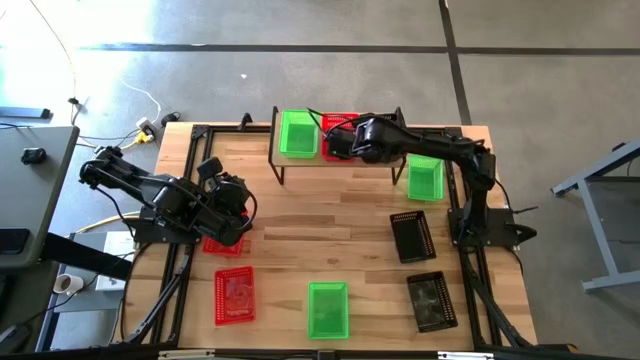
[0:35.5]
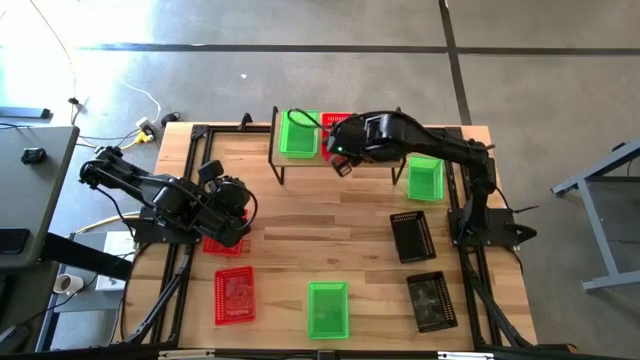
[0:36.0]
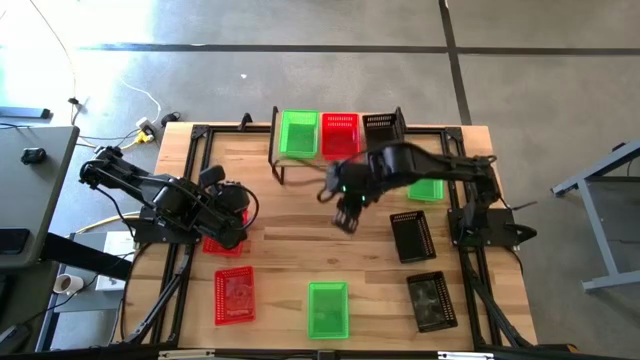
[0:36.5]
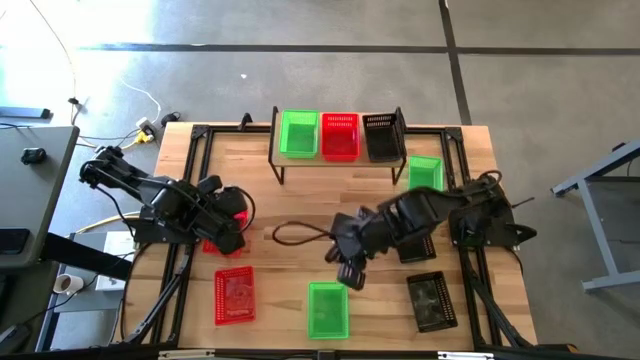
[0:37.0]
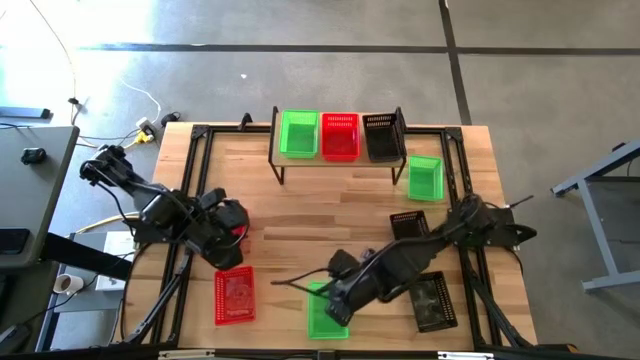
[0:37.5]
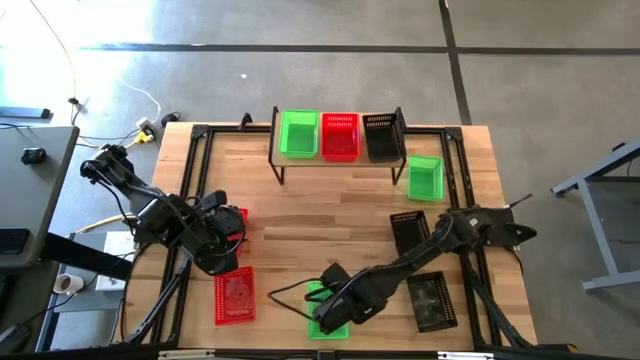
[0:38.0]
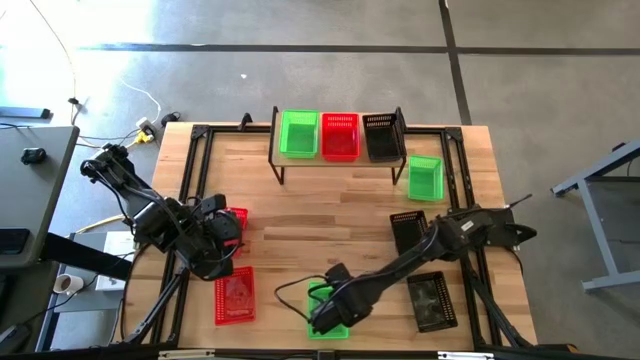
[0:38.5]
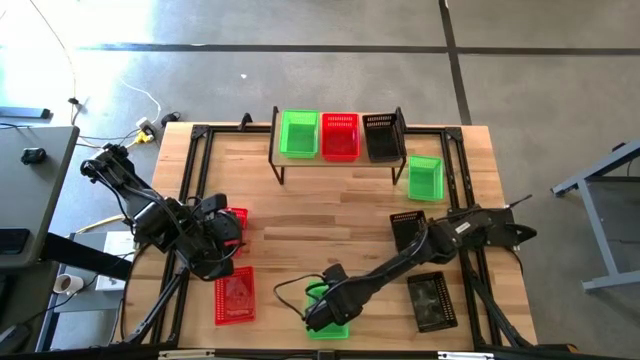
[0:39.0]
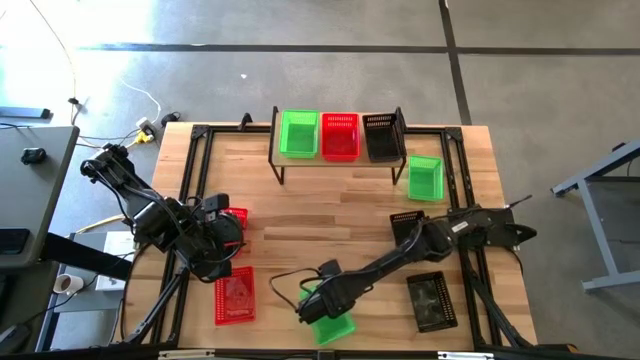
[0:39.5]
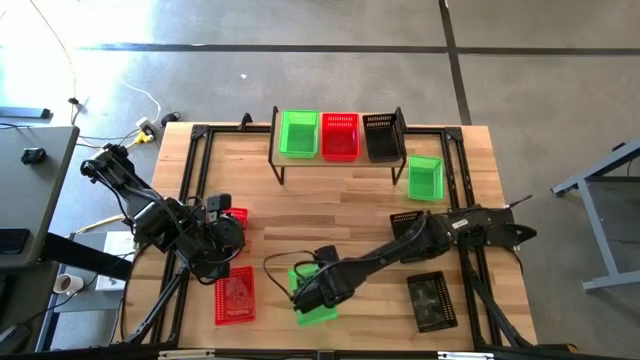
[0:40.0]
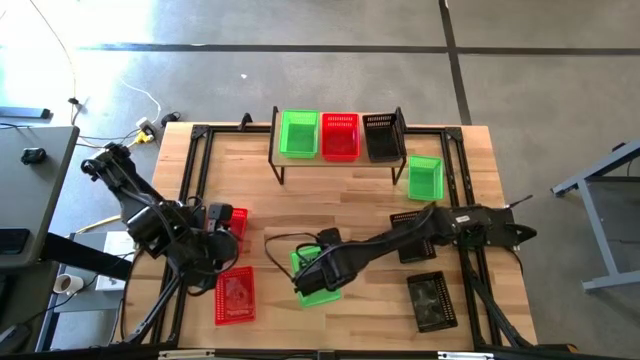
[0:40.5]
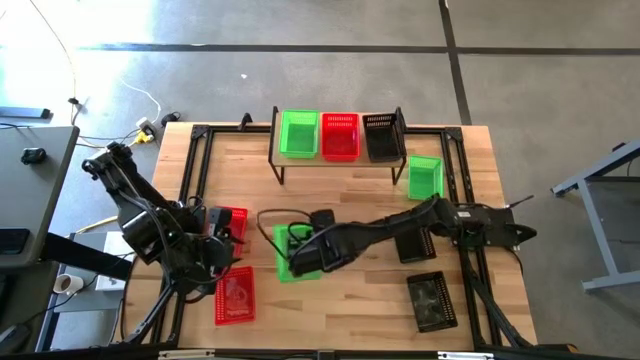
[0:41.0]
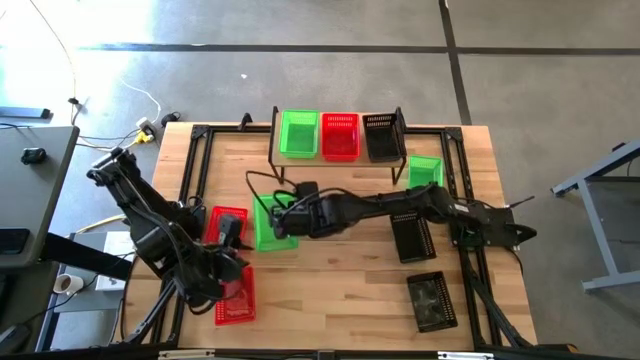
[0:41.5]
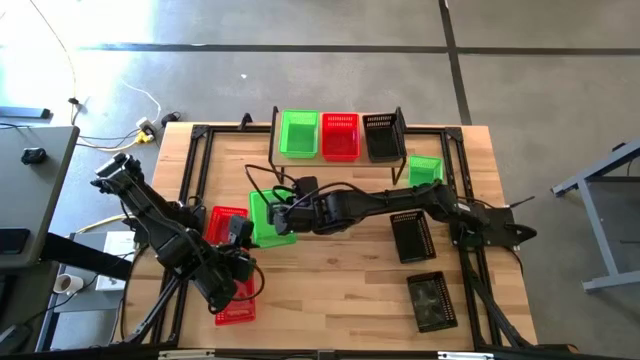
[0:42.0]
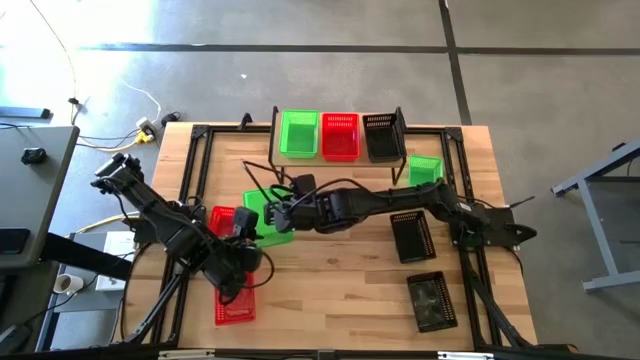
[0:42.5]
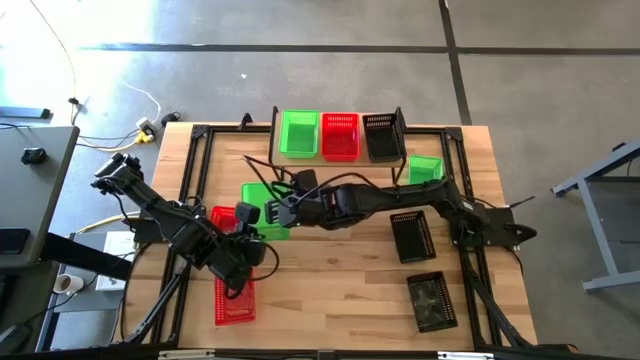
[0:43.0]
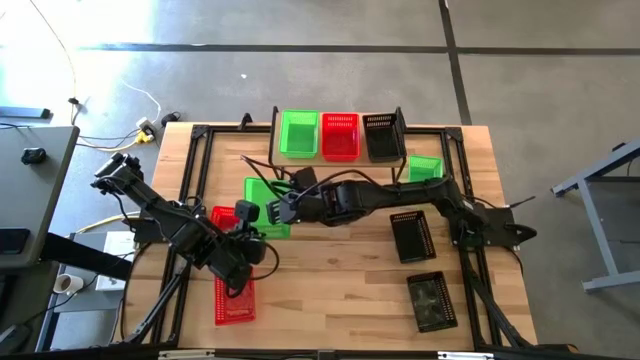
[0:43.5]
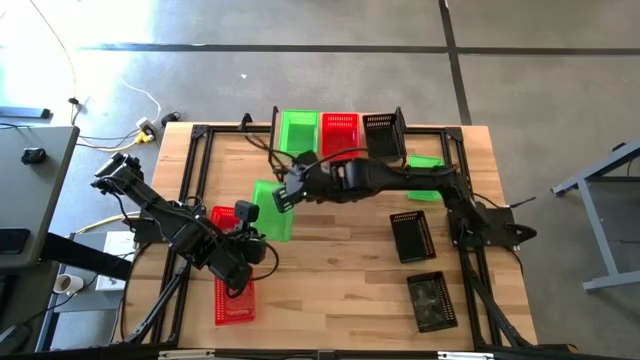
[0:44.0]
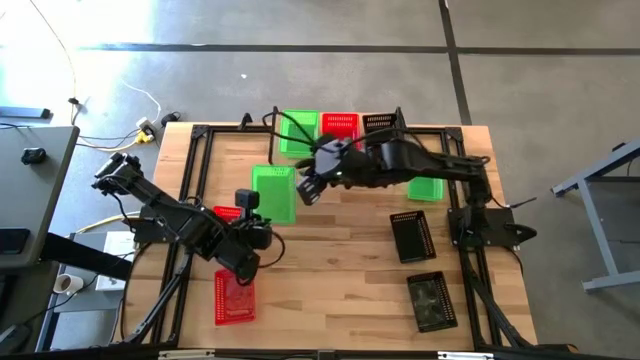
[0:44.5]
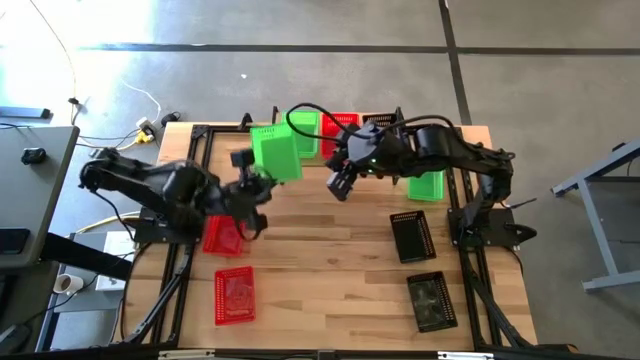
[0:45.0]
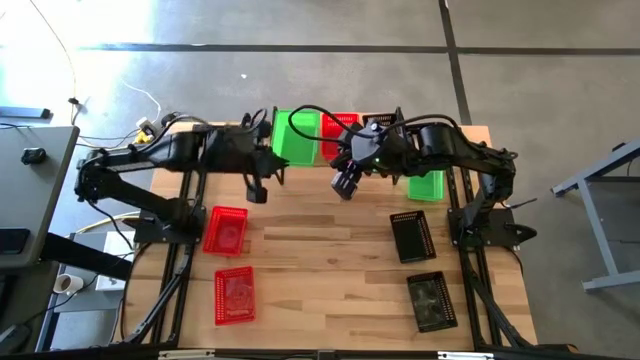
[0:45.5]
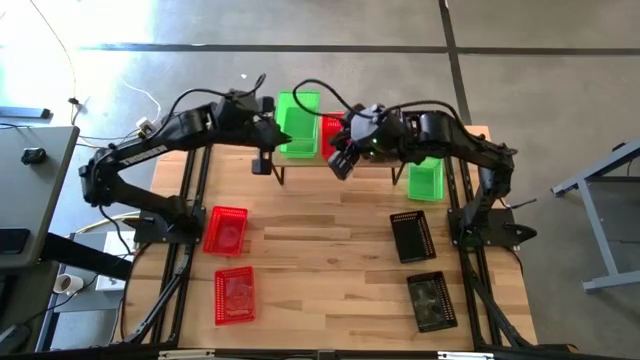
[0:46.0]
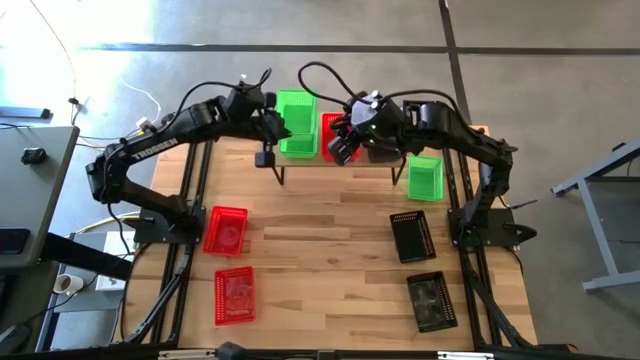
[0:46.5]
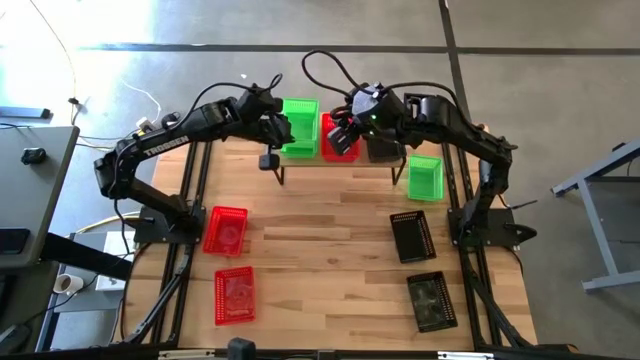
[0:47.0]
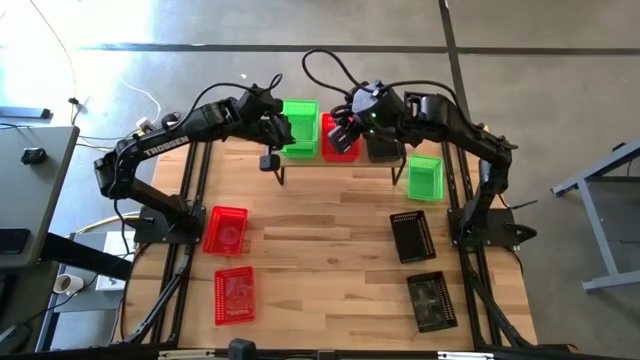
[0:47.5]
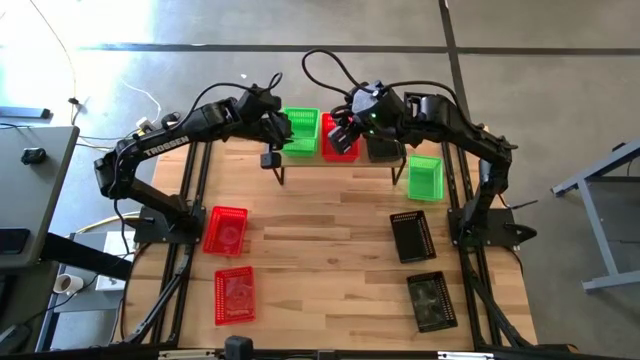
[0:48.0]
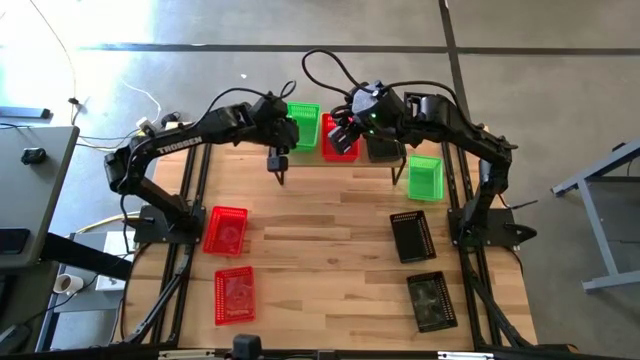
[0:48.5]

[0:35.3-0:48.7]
Task: Stack baskets on shelf by color
Stack the bottom green bin on top of the green bin on the shelf

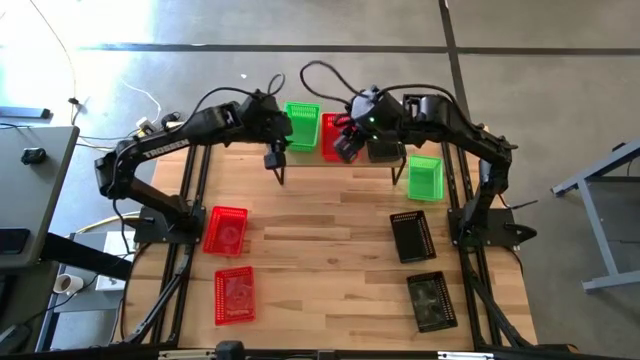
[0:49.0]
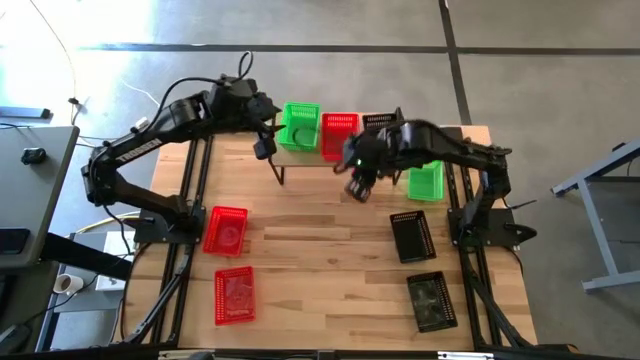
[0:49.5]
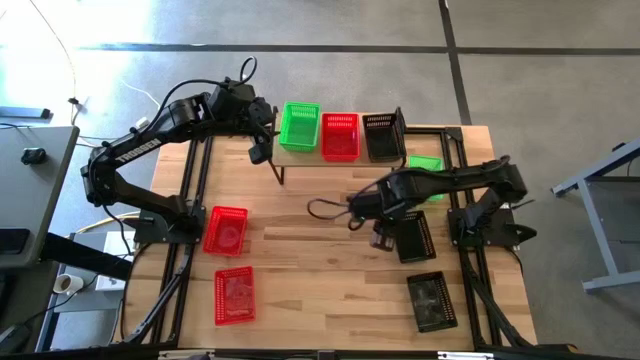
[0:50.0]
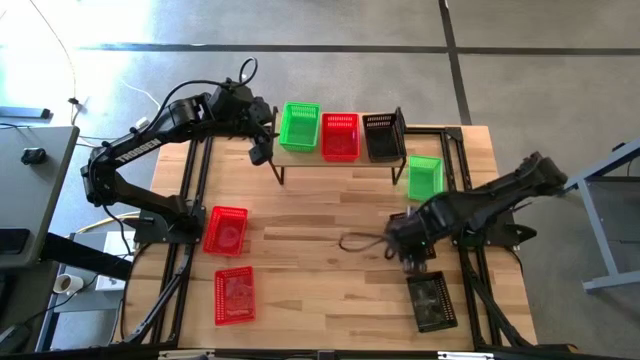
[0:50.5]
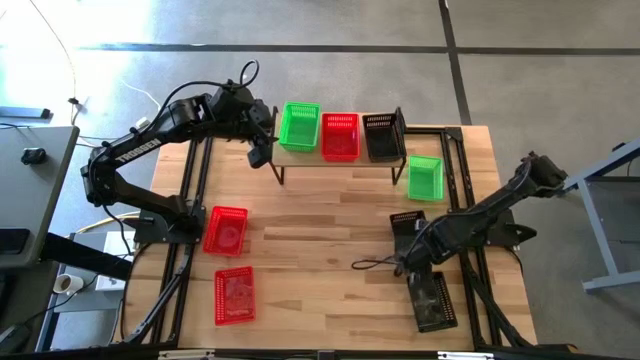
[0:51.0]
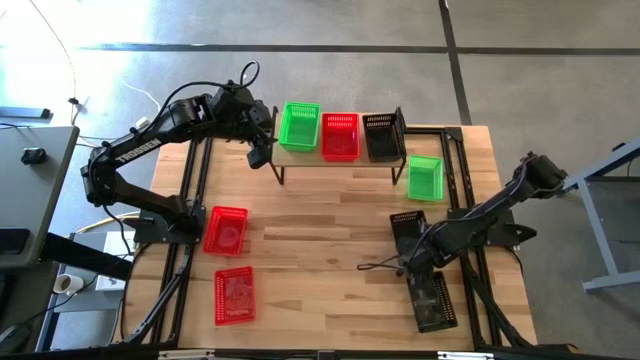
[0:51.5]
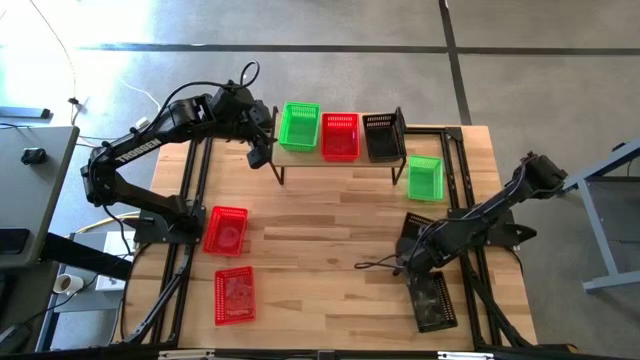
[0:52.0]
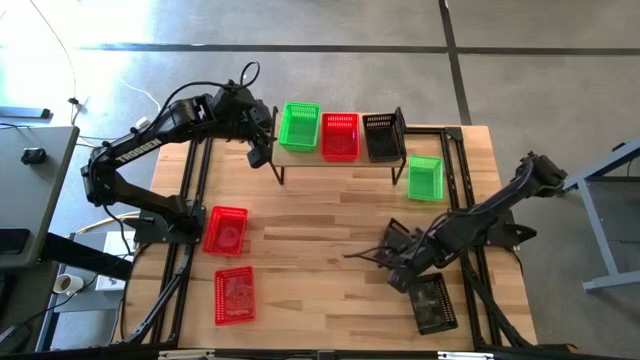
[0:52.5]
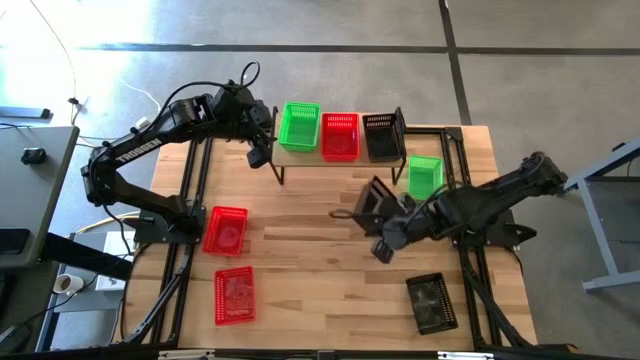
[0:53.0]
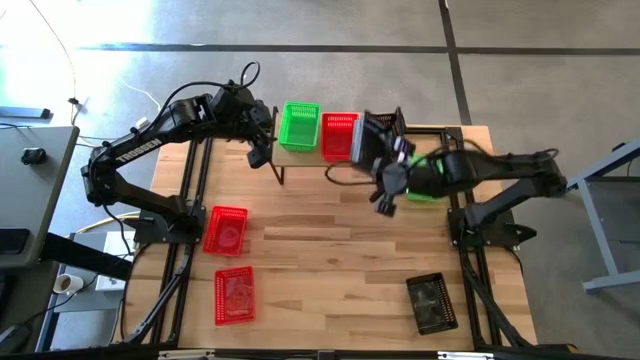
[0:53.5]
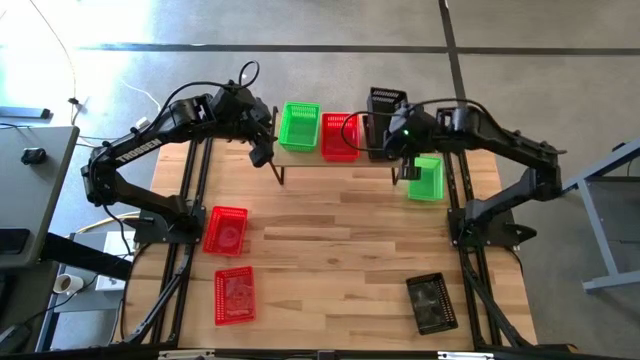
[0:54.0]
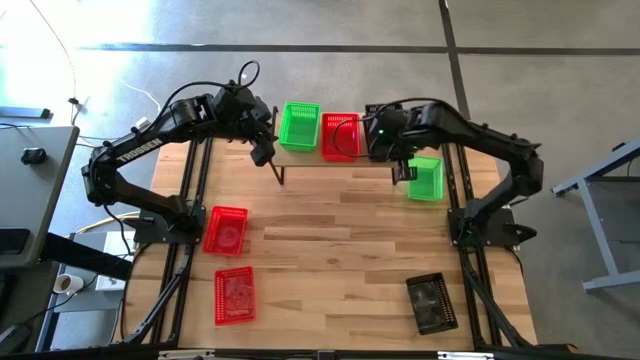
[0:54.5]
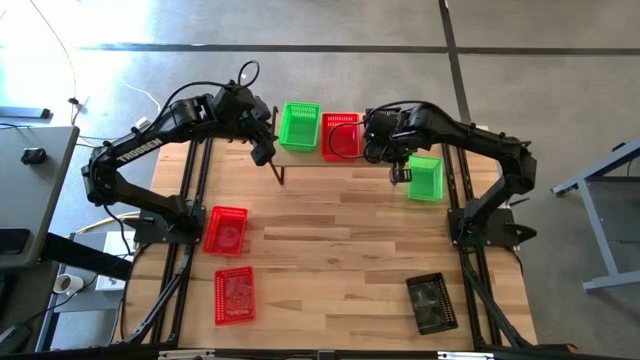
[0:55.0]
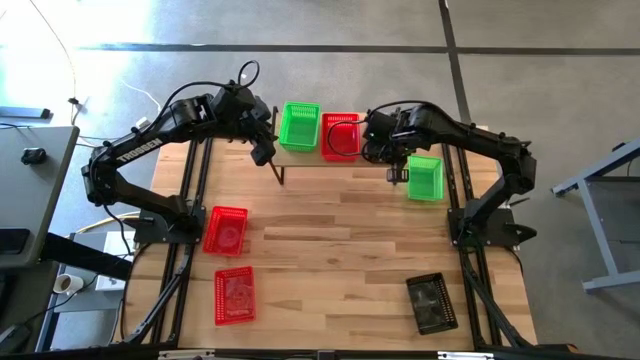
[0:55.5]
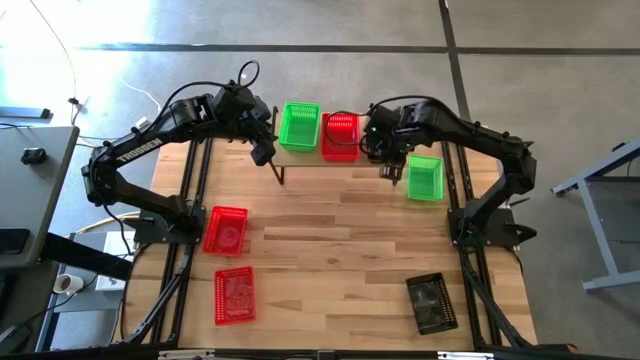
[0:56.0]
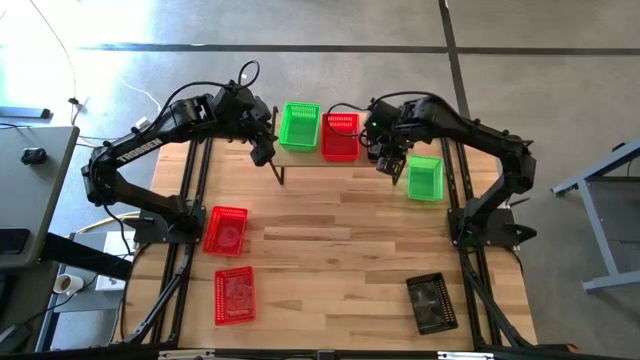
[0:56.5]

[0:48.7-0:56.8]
Stack the top black bin on top of the black bin on the shelf

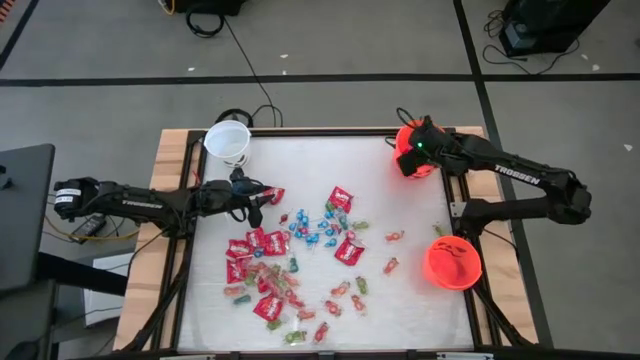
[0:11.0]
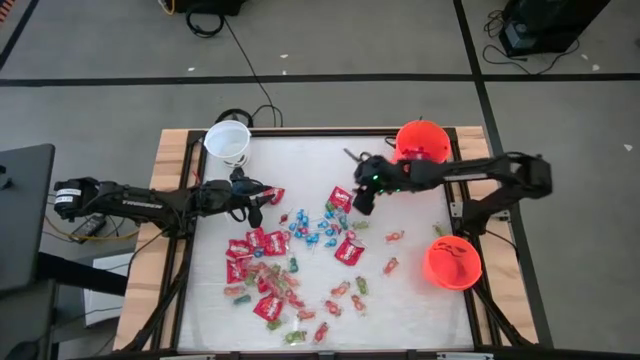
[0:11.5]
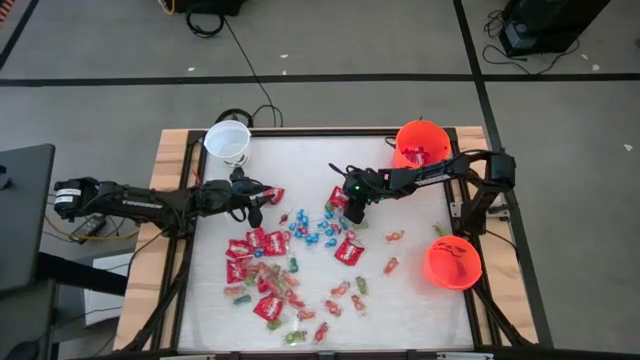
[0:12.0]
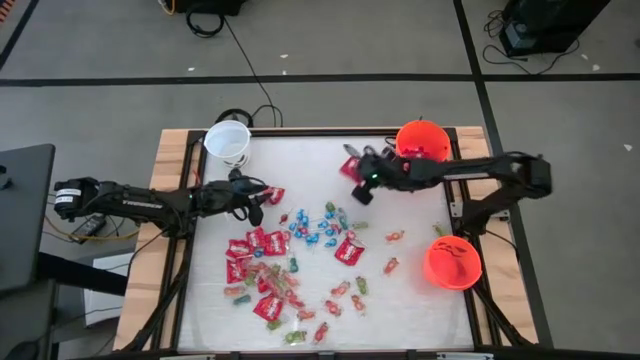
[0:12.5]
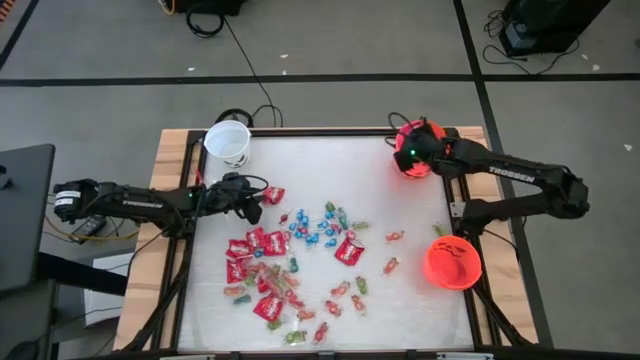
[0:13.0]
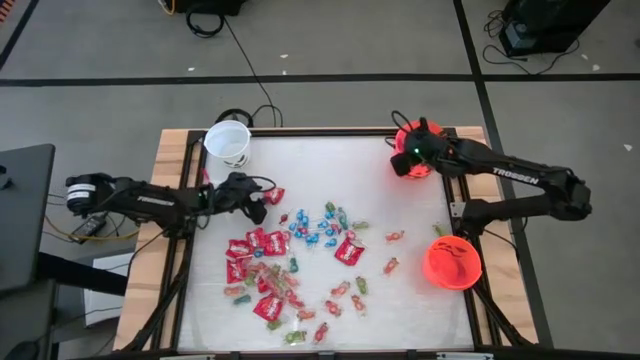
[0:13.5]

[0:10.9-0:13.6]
Task: Sort candy by brand, put in halloween buckets
Put the red candy into the top orange bucket
